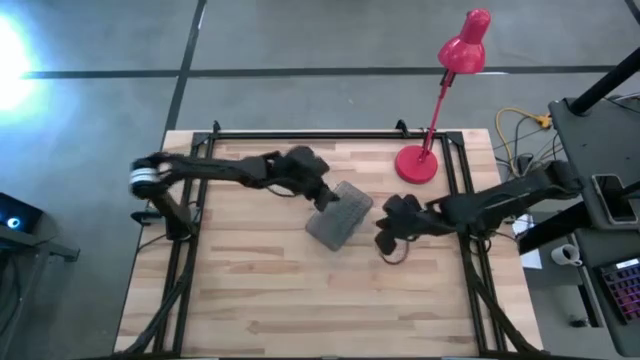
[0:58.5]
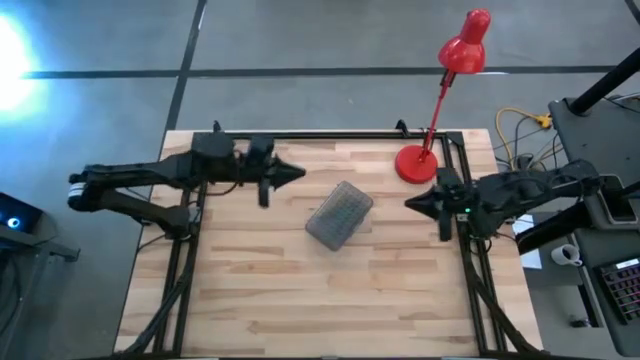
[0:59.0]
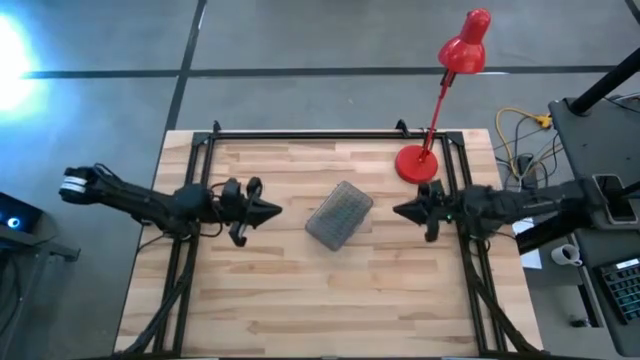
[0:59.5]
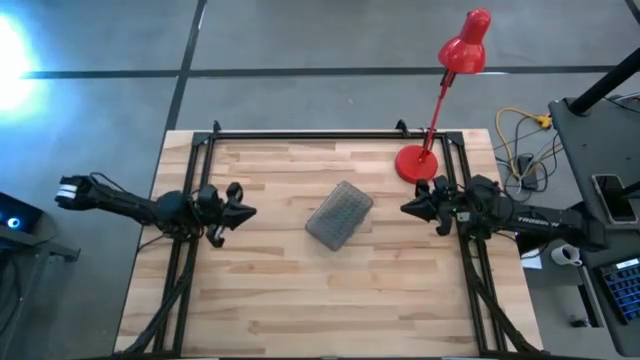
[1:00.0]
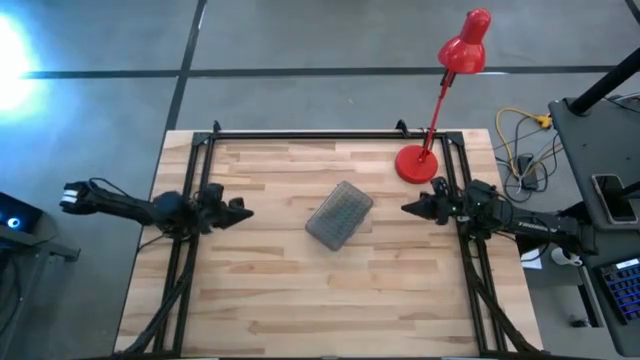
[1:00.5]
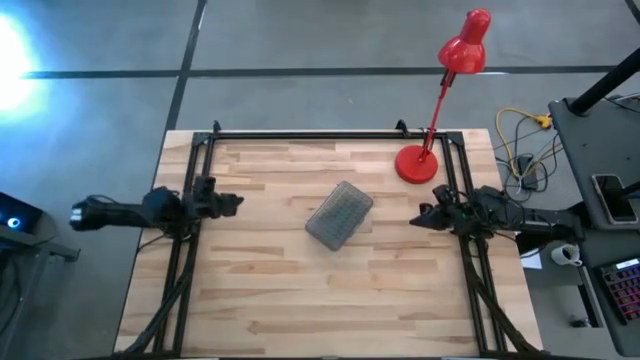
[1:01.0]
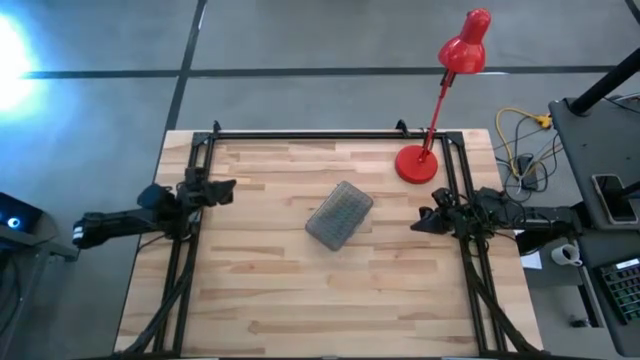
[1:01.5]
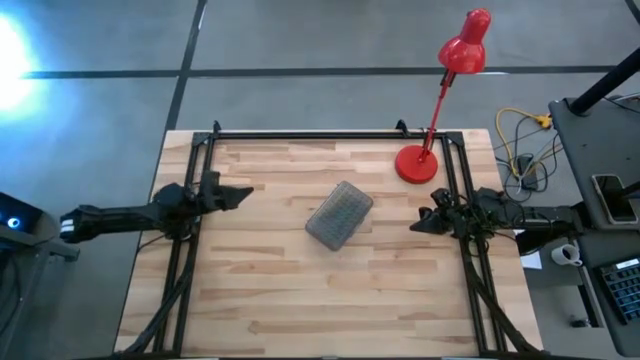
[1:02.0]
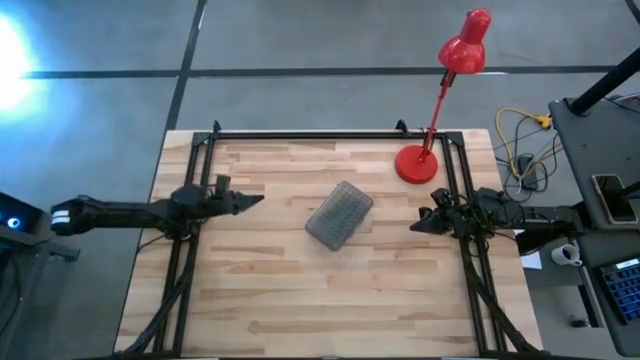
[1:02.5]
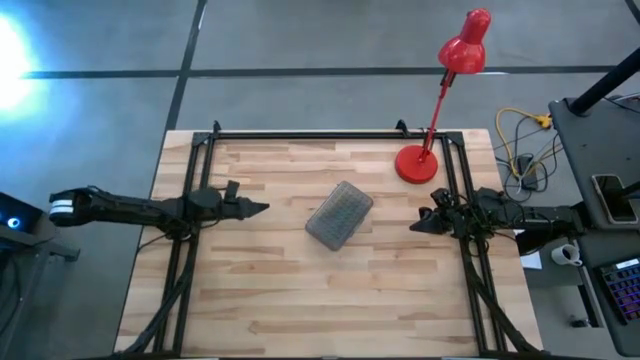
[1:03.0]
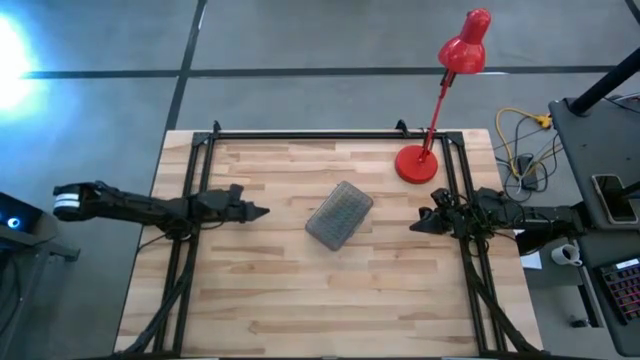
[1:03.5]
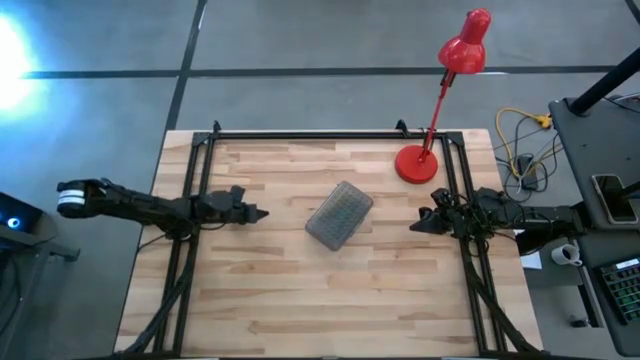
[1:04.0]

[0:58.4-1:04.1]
Task: Pick & place school supplies into a supply box
Return to Home Position

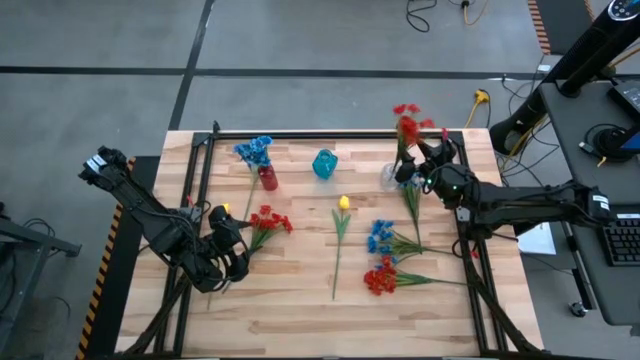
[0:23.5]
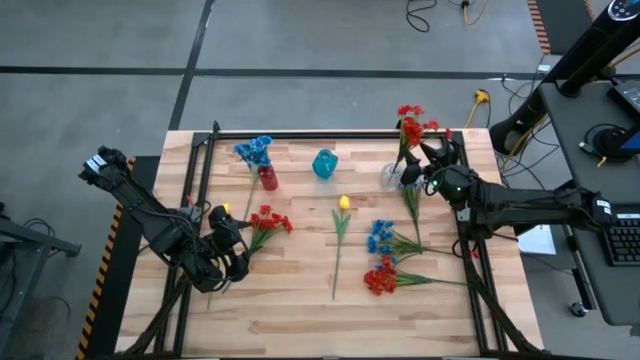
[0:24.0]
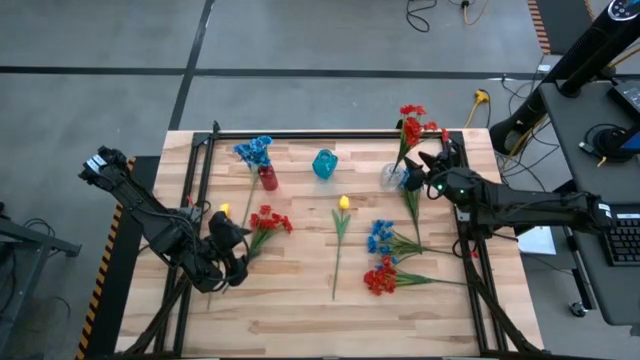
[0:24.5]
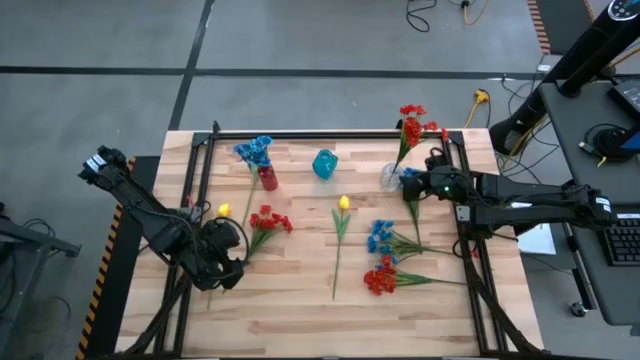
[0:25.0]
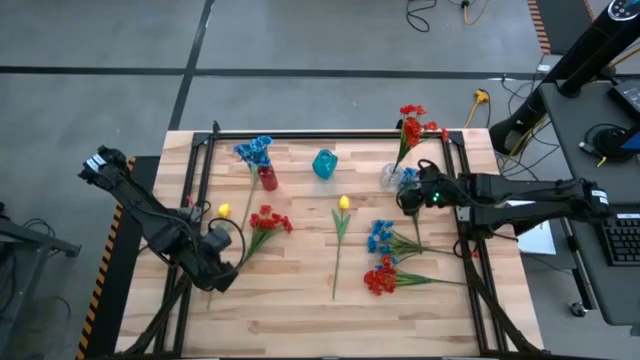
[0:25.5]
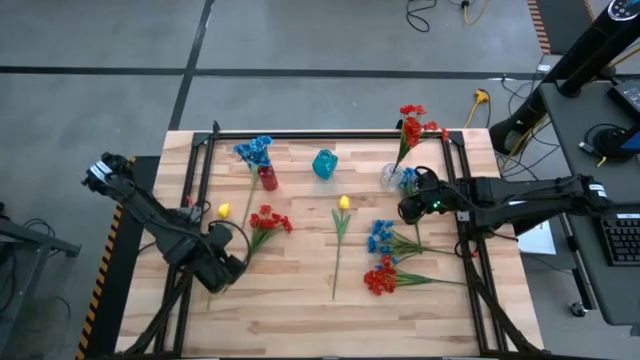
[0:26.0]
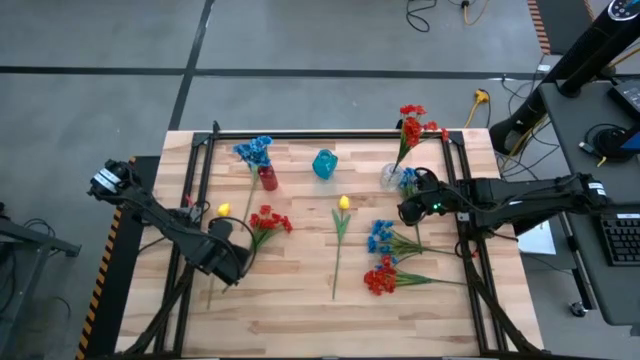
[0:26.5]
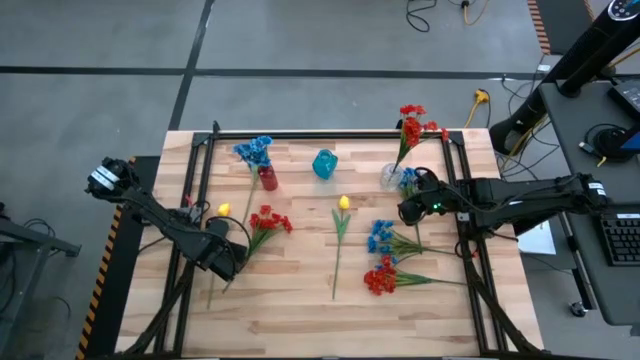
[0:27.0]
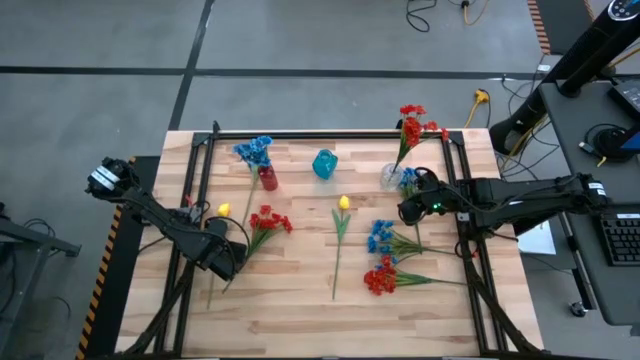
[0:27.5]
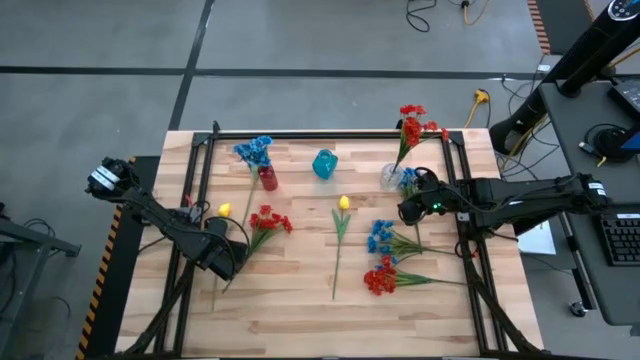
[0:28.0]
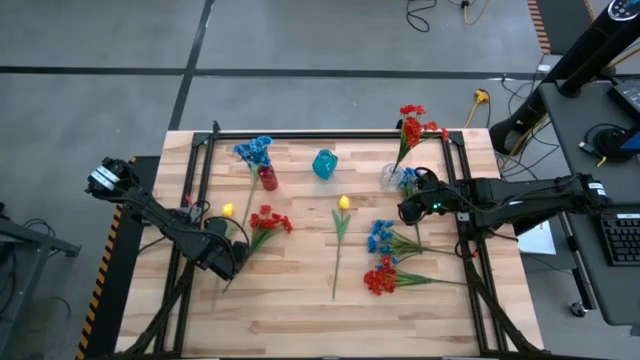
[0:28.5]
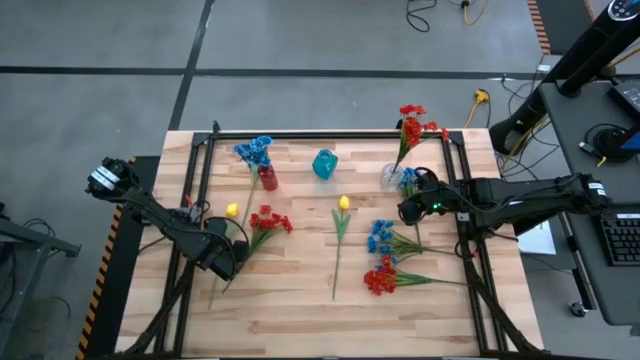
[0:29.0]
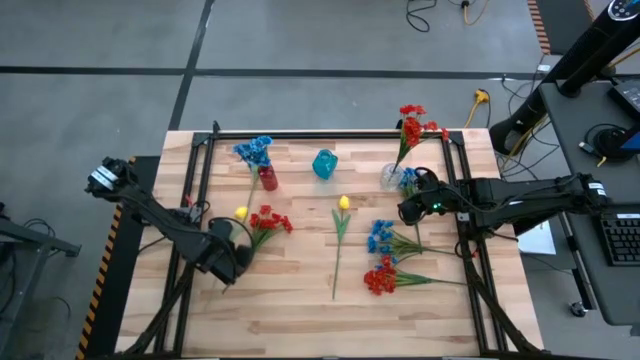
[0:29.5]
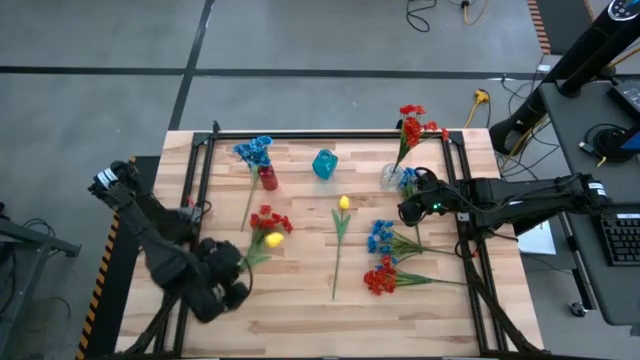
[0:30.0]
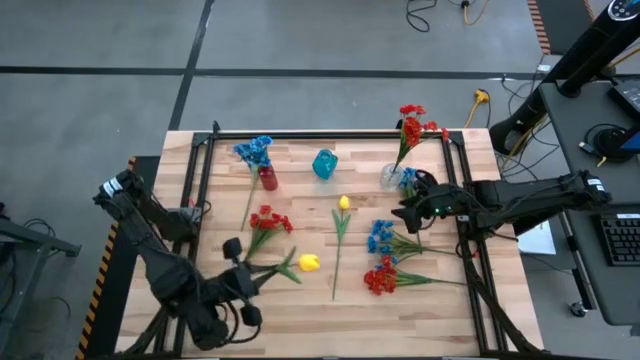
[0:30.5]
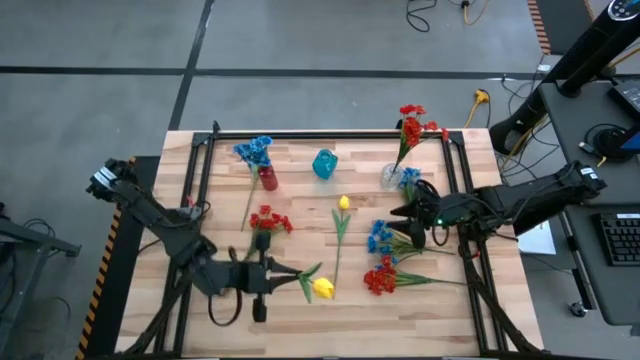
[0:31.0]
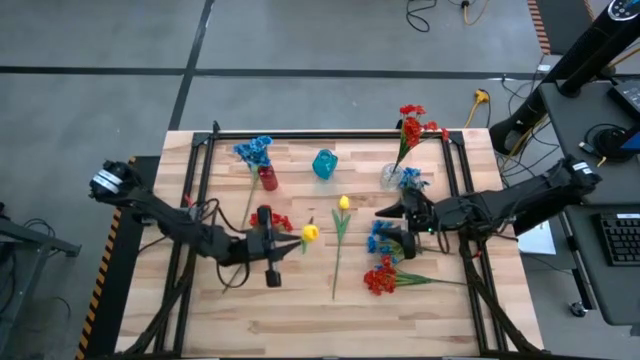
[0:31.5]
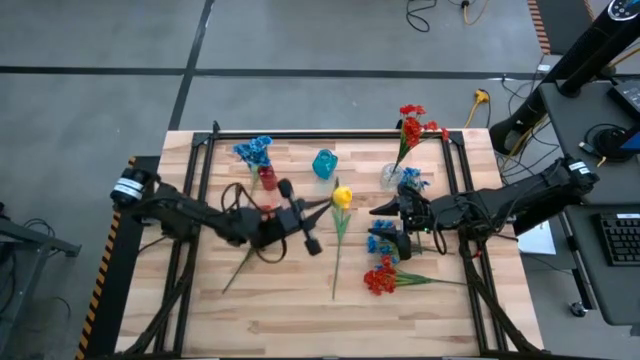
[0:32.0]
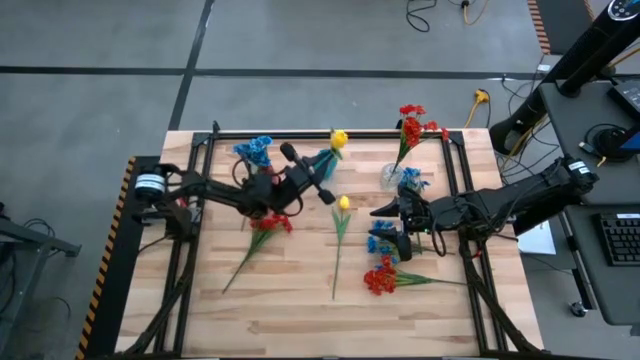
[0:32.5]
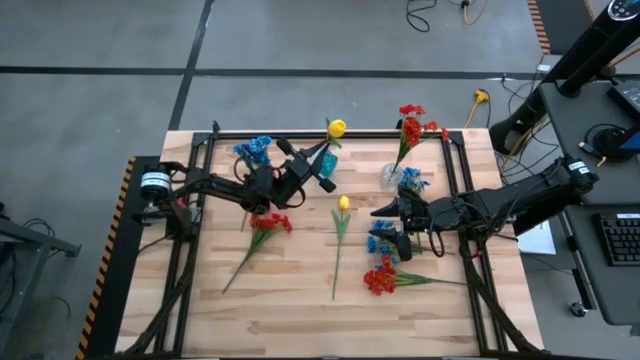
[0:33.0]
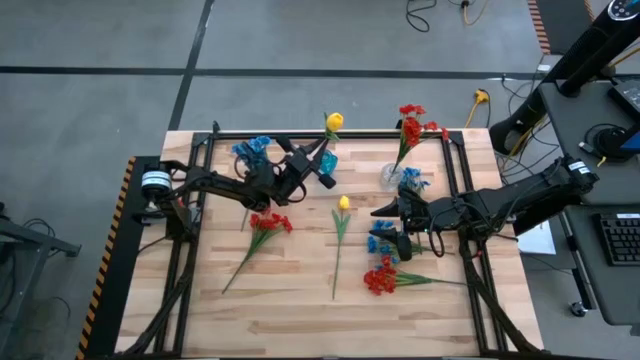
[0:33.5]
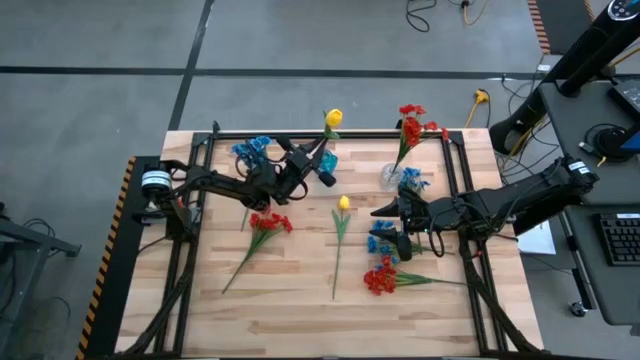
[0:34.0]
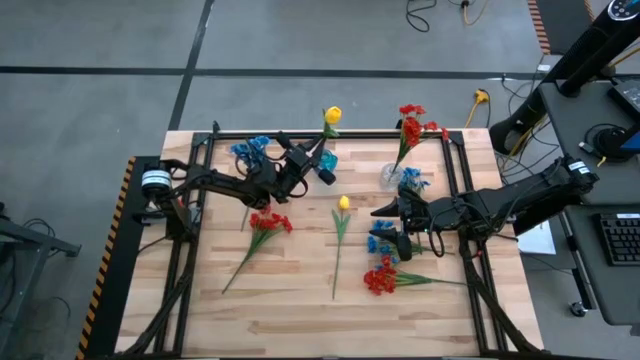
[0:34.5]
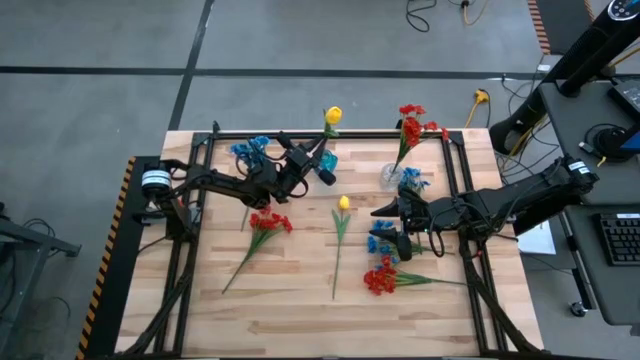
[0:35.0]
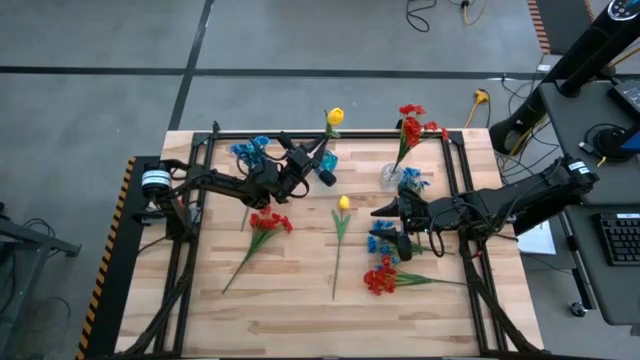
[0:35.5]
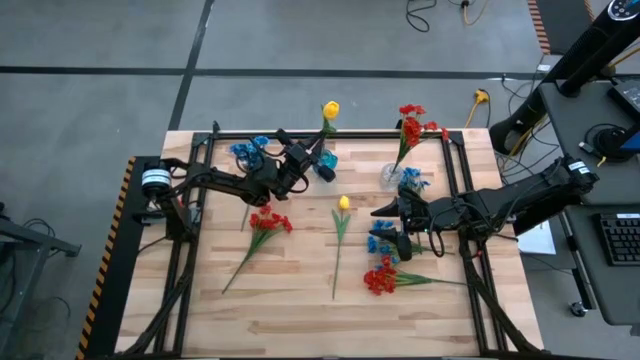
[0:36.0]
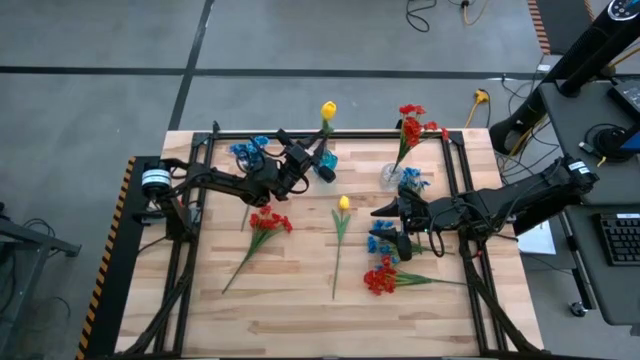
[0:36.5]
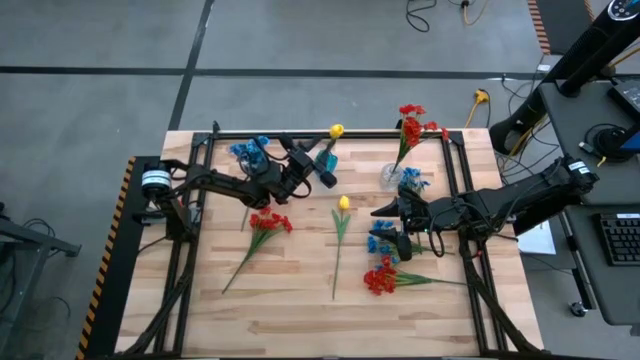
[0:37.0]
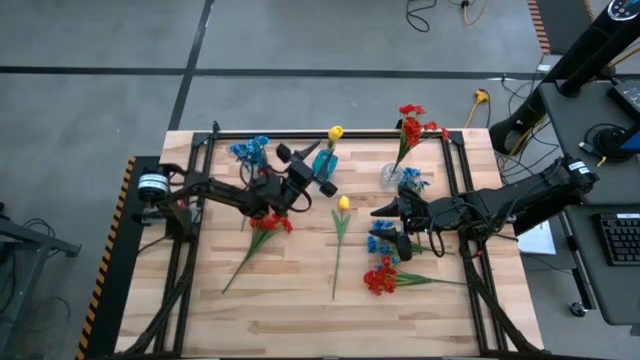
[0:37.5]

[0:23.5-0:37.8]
Task: Sort flowers into vase by color
Put the bottom left yellow flower into the blue vase
